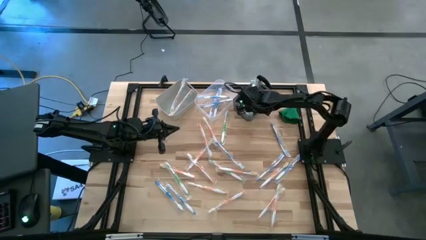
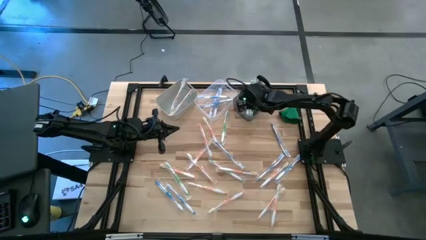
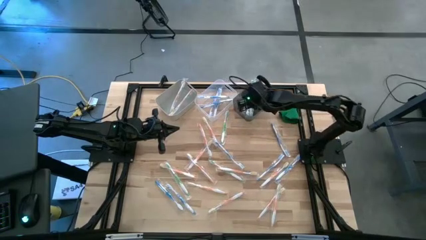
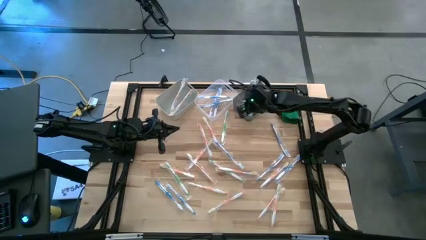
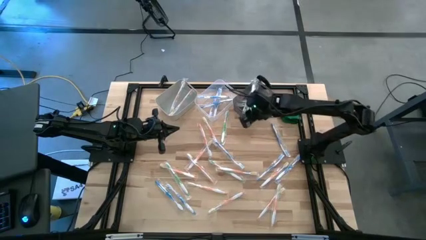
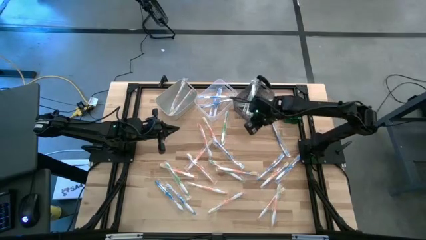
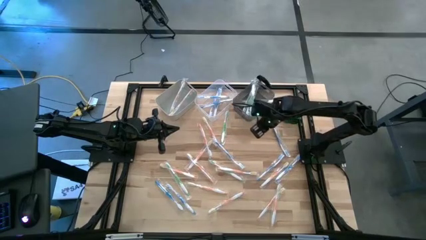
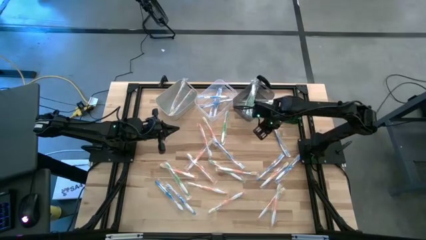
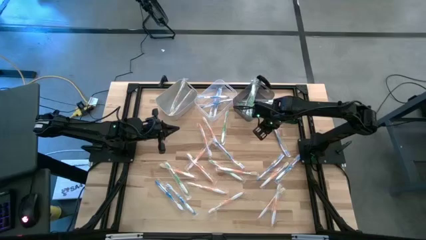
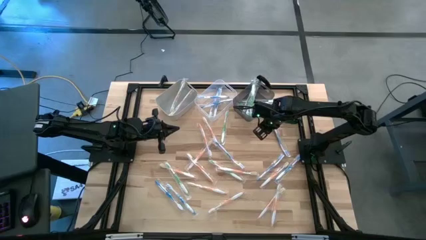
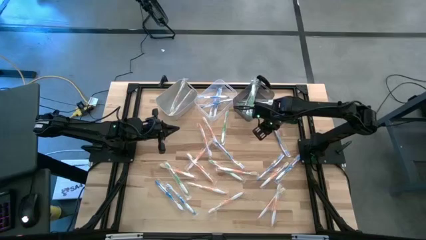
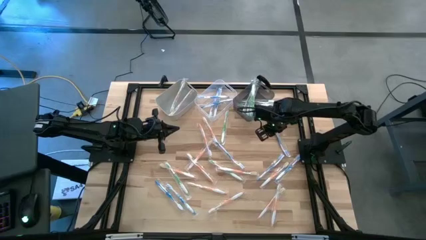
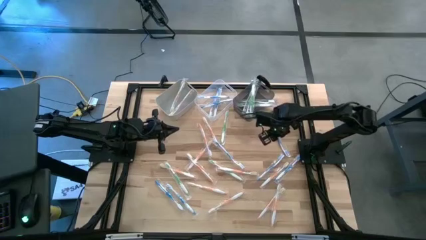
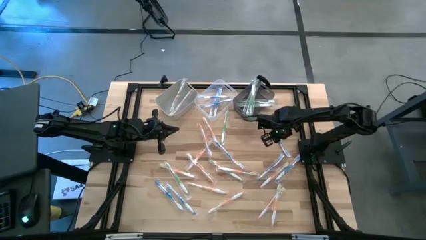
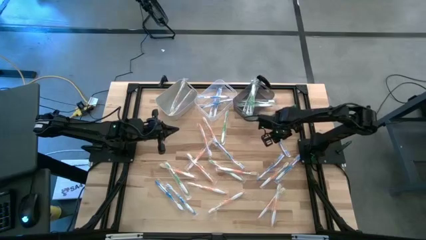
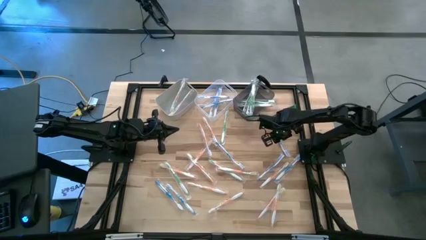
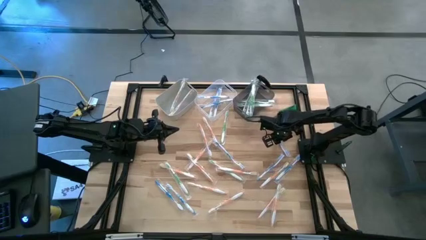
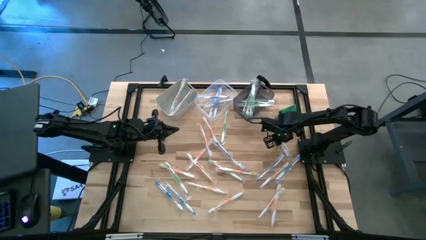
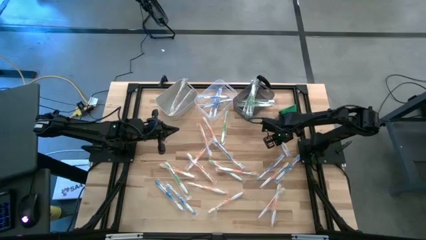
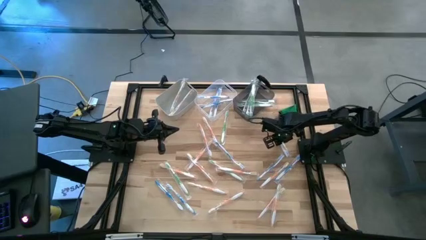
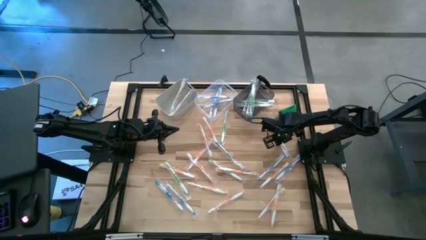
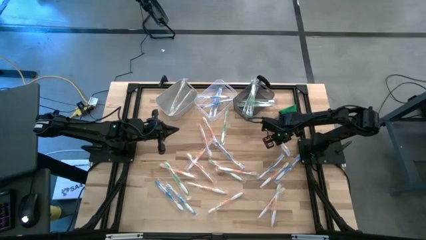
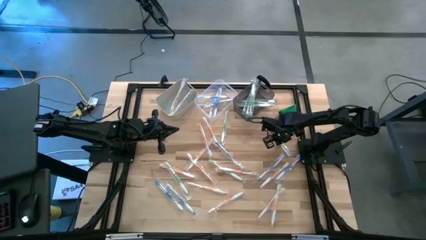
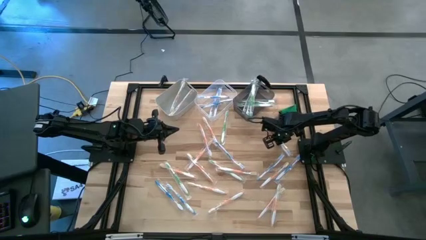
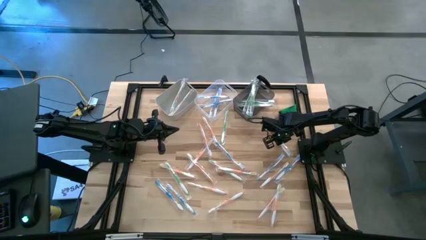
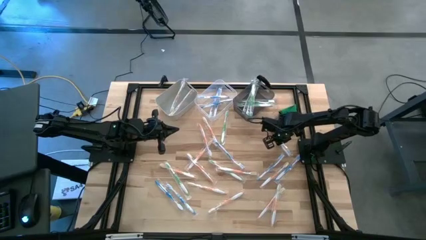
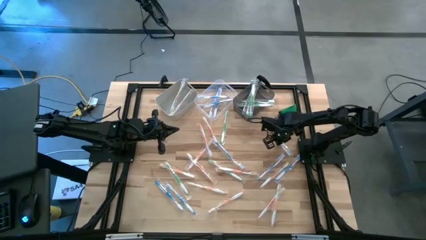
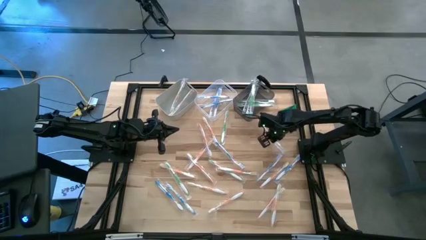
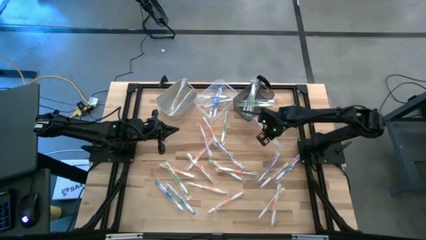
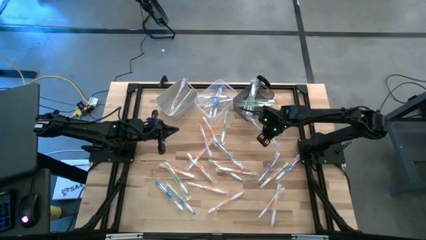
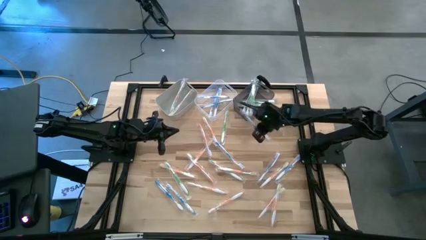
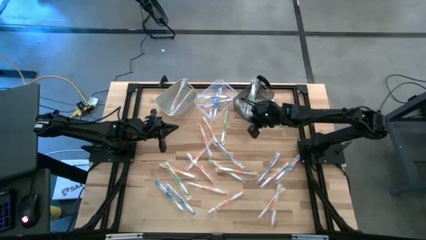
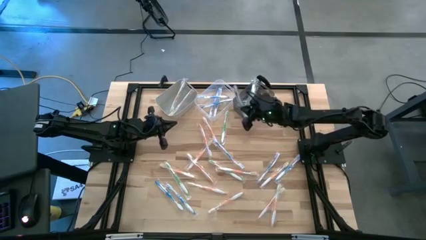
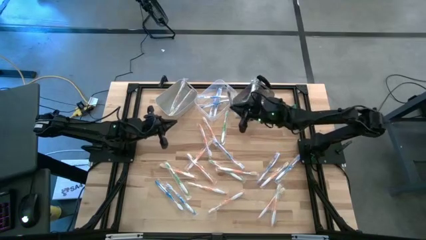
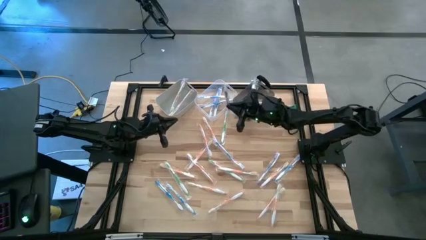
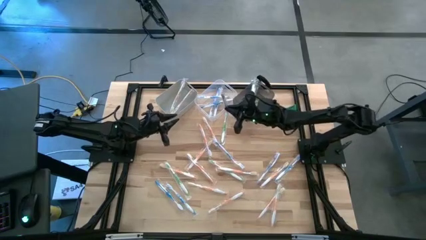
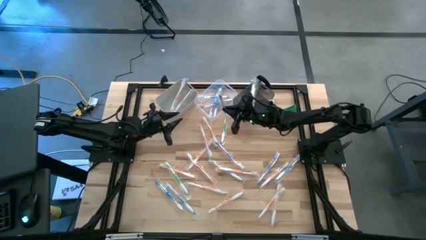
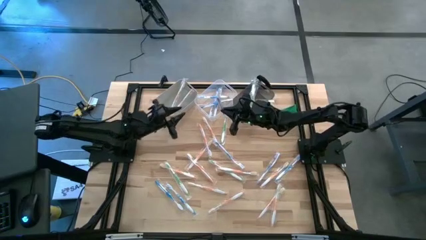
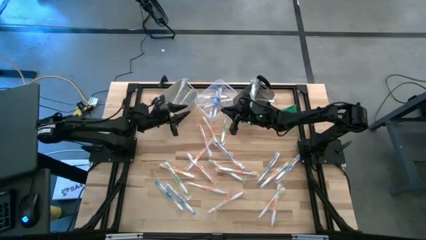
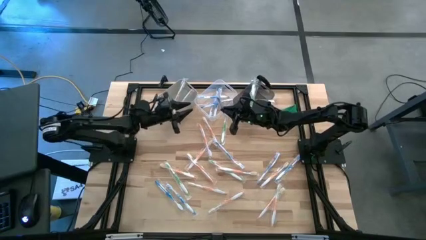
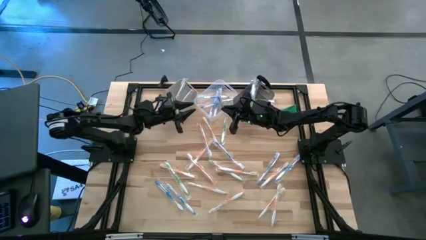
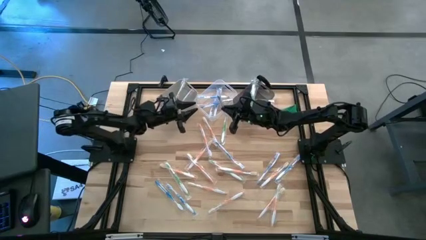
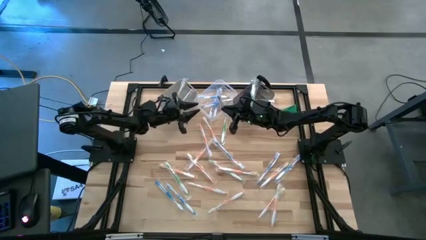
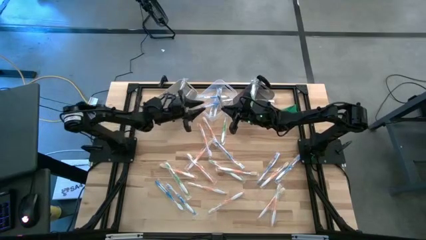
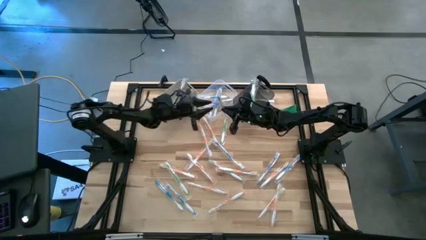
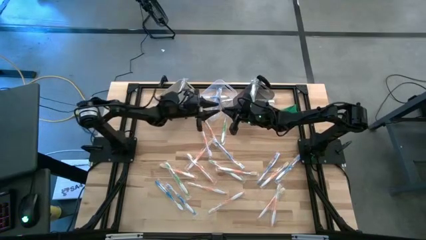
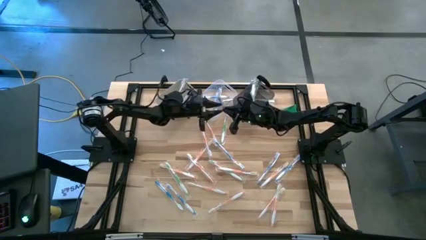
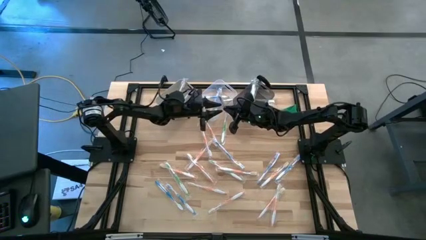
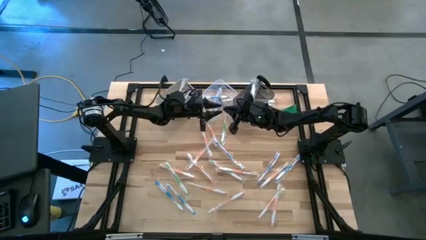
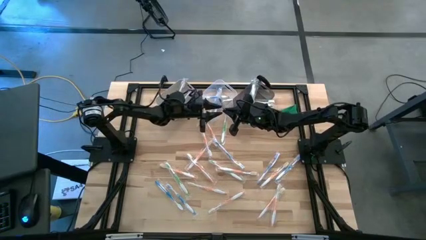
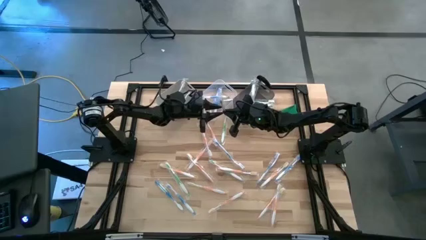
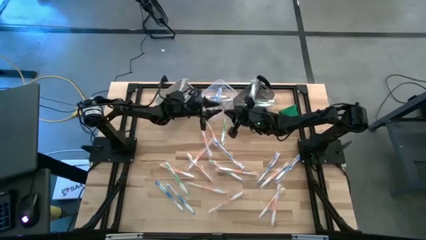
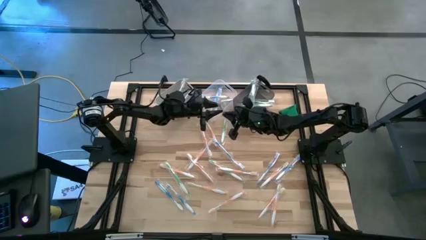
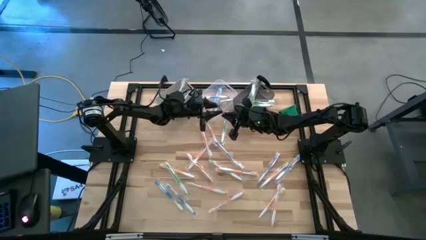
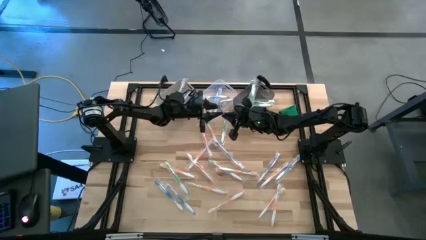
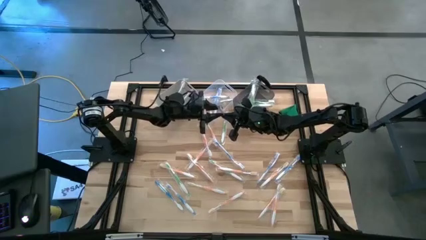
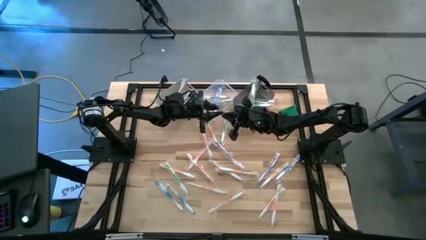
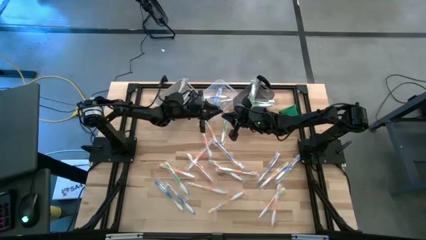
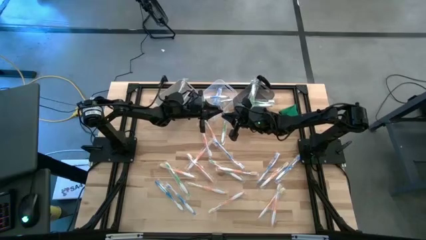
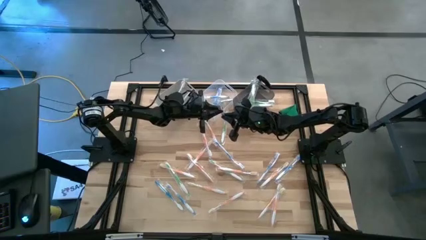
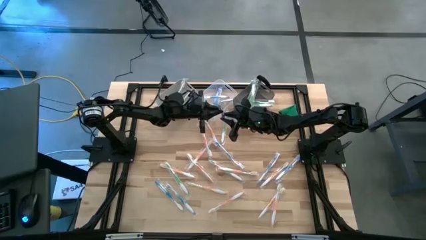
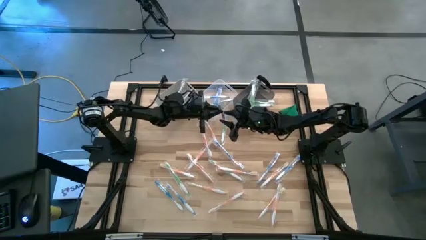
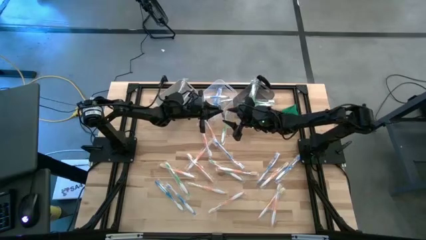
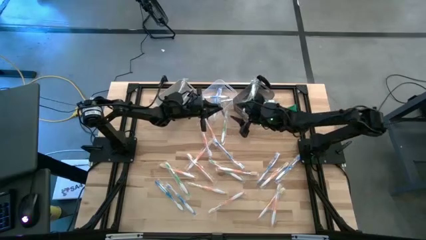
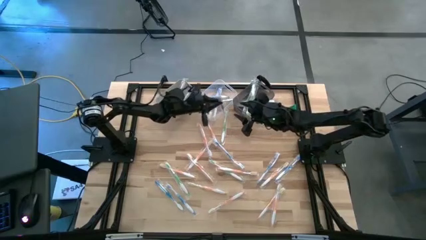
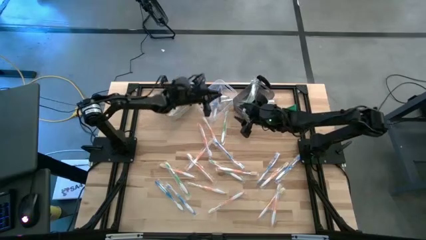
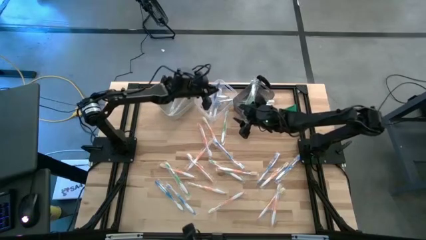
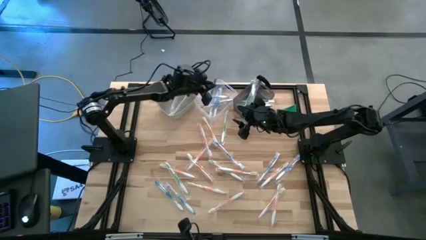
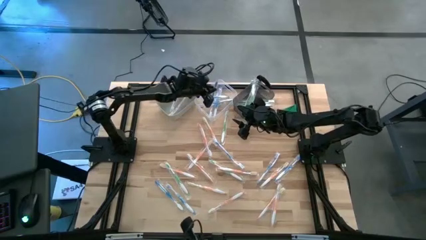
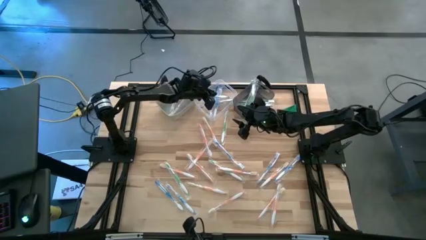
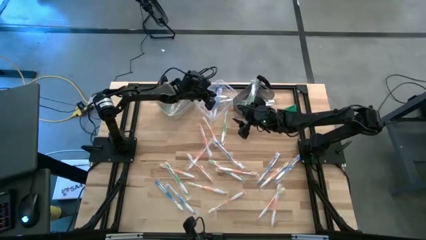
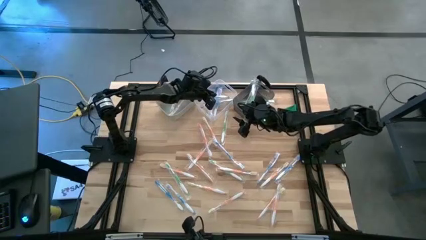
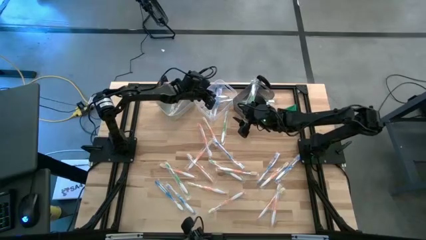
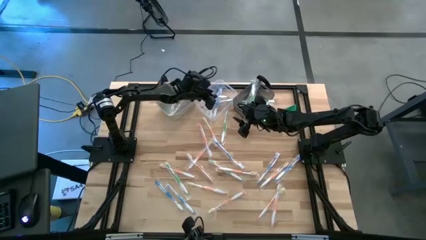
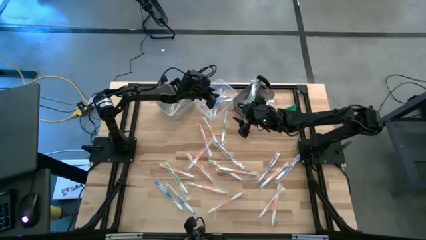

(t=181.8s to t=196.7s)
Task: Pick & Place Toothbrushes
Put the blue toothbrush into the transparent bin

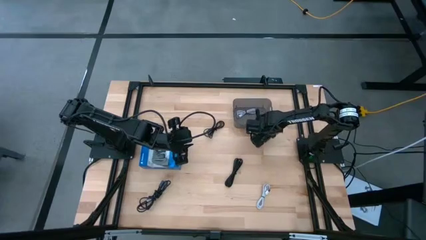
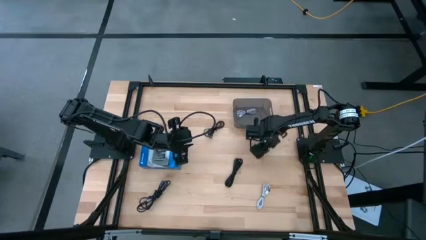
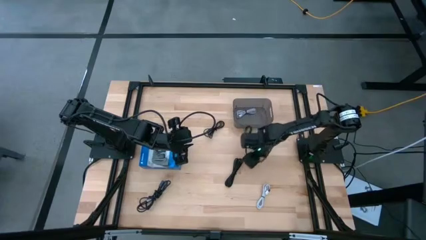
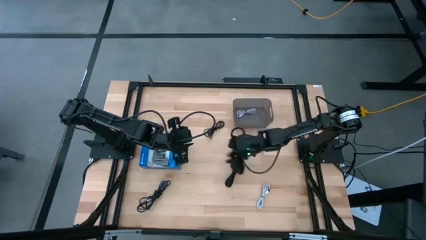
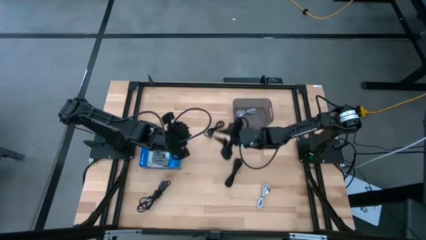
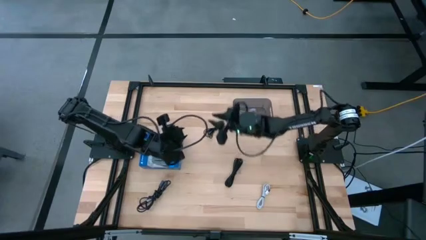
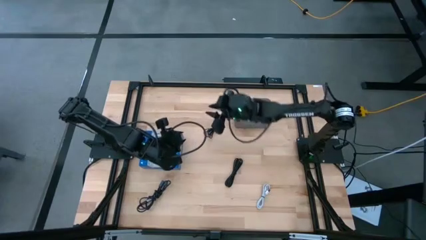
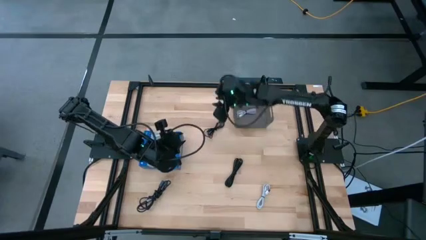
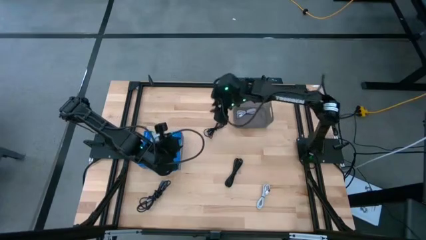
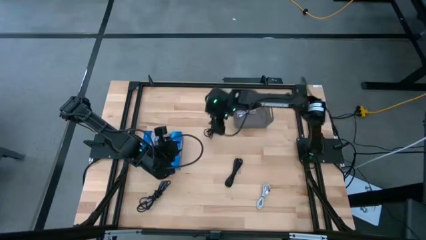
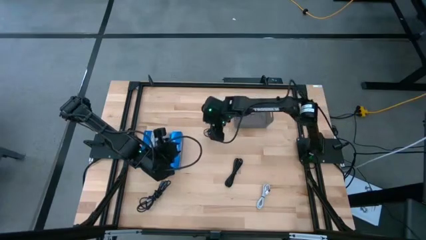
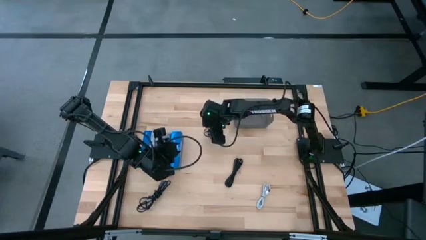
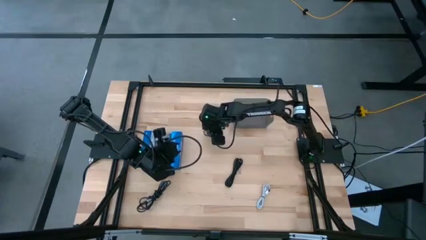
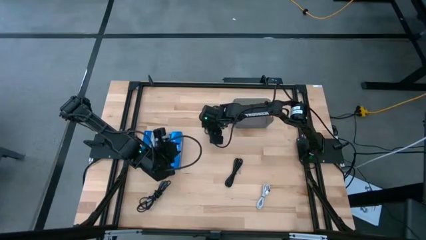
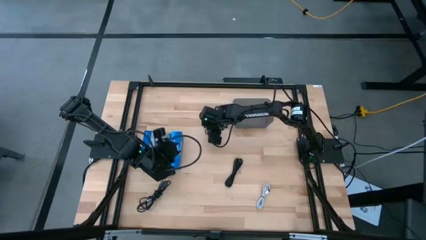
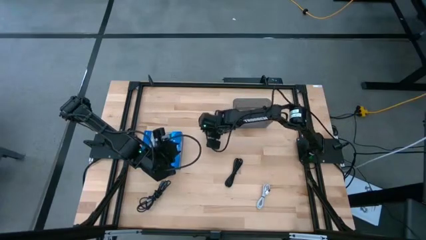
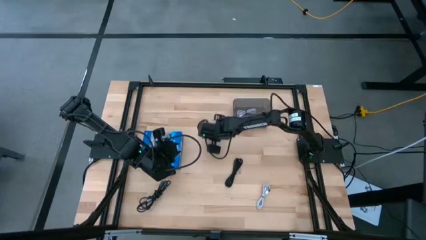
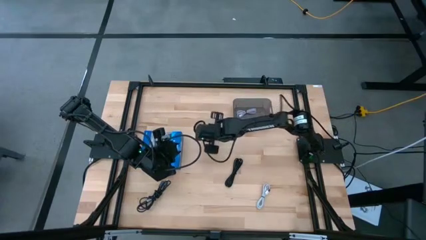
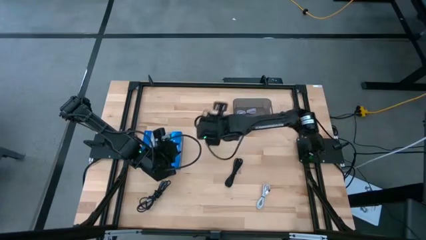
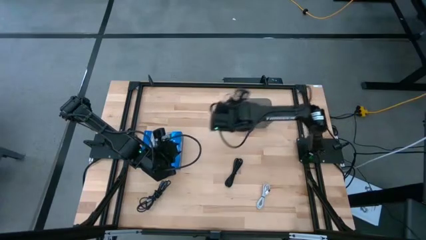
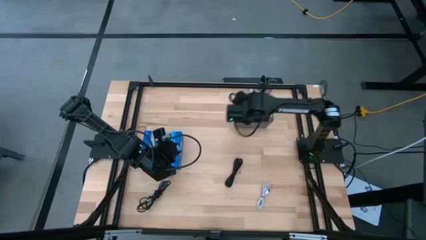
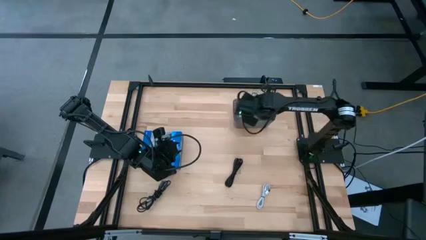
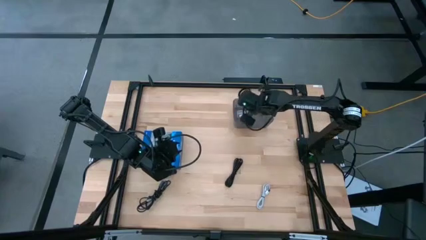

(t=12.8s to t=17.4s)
Task: Pick and place USB-C Cables
Put the top black charger cable into the black bin
